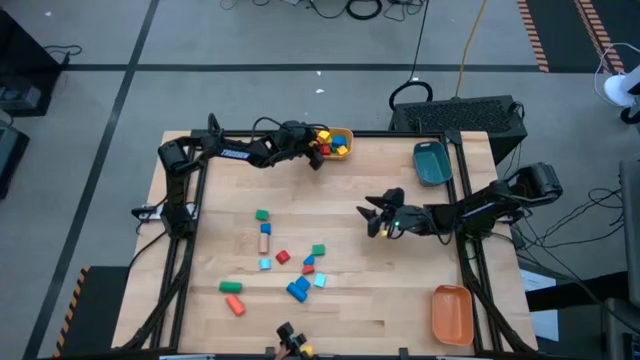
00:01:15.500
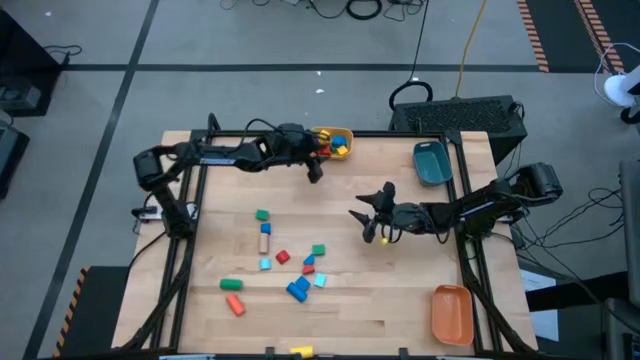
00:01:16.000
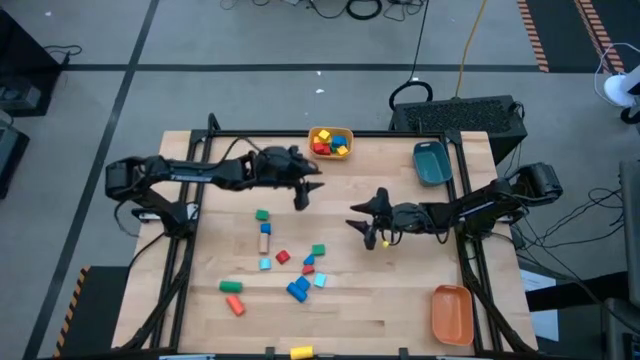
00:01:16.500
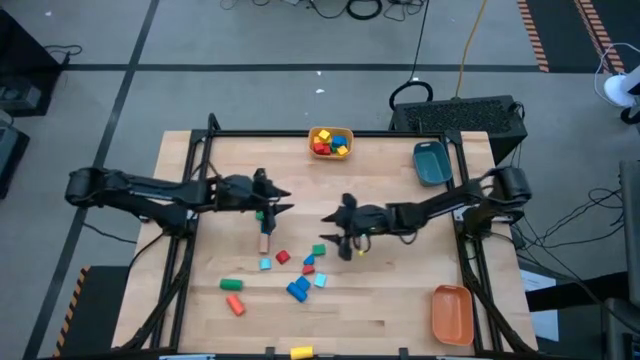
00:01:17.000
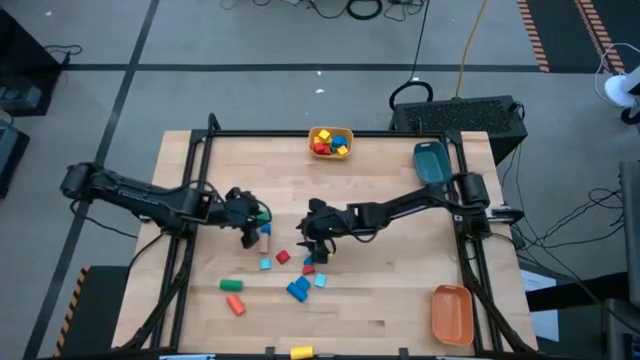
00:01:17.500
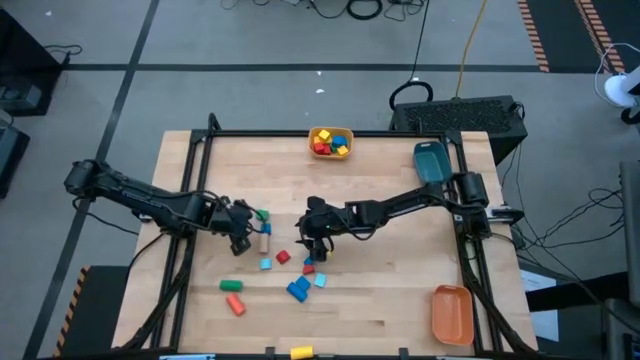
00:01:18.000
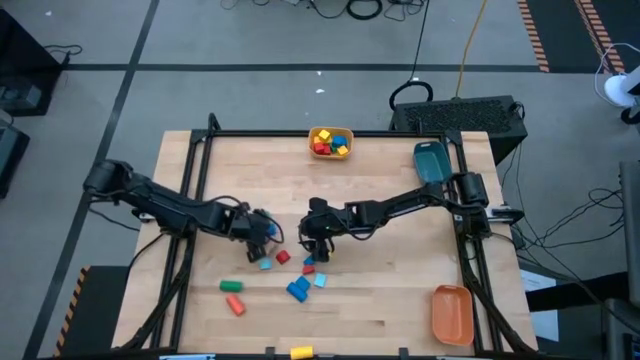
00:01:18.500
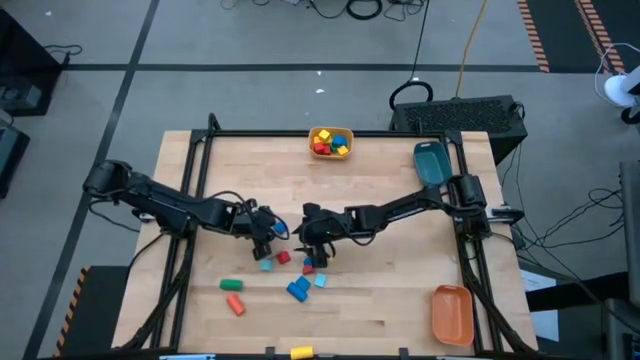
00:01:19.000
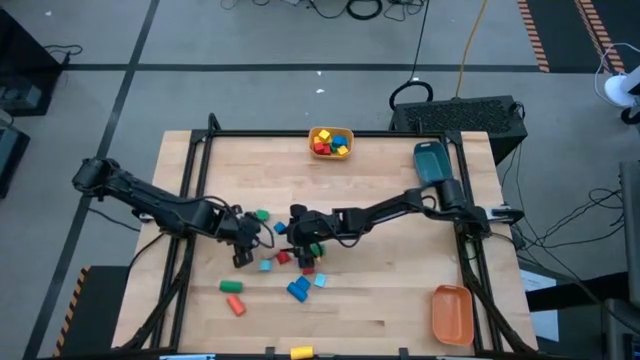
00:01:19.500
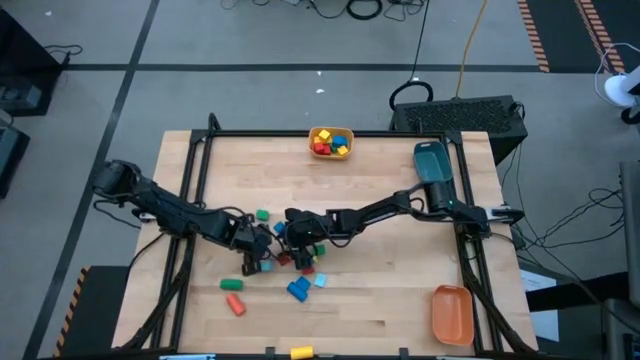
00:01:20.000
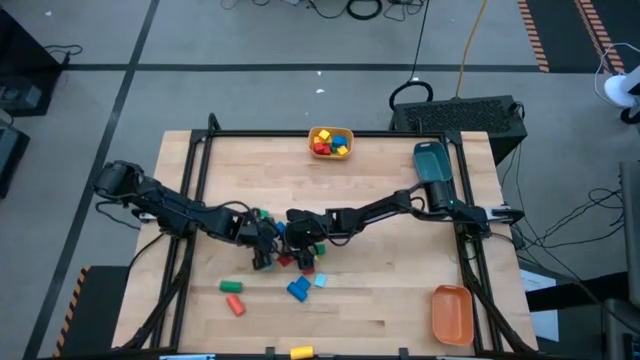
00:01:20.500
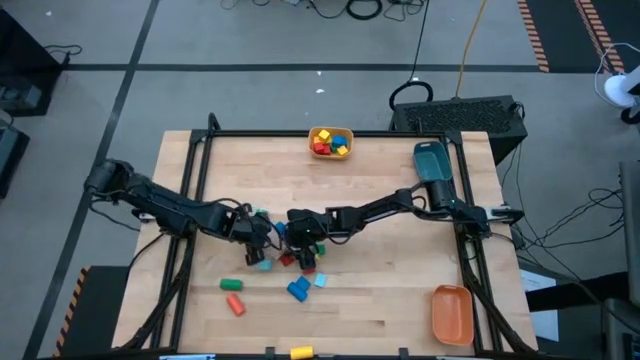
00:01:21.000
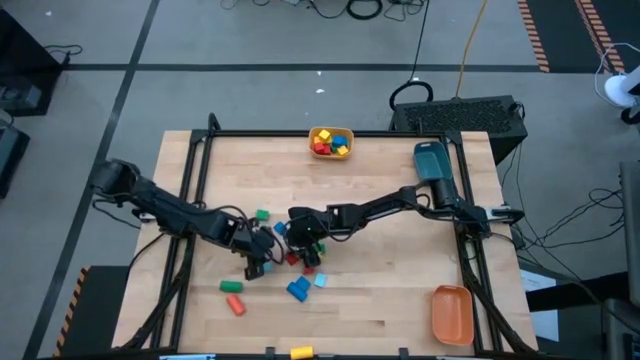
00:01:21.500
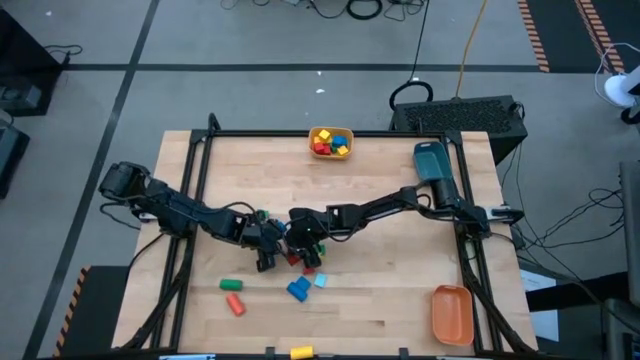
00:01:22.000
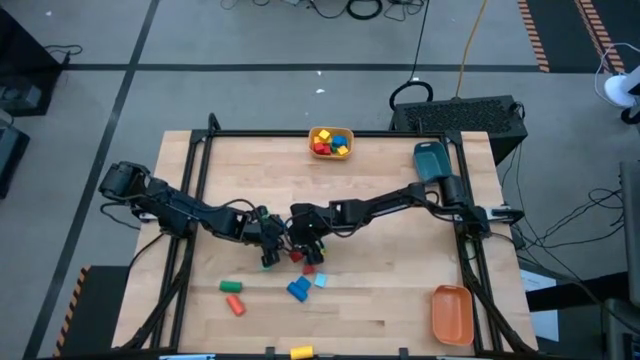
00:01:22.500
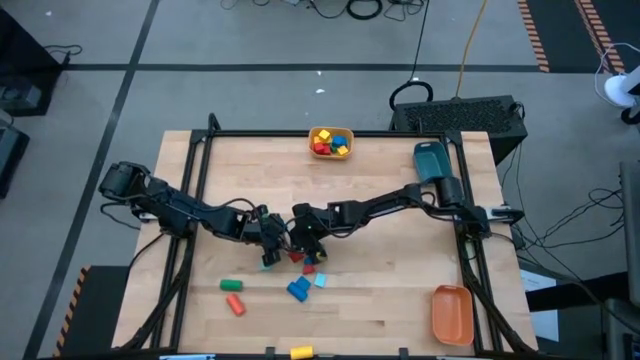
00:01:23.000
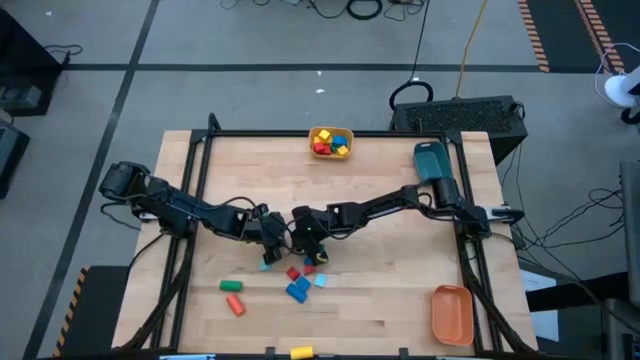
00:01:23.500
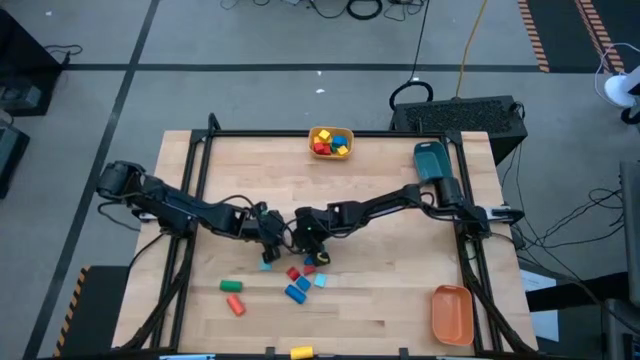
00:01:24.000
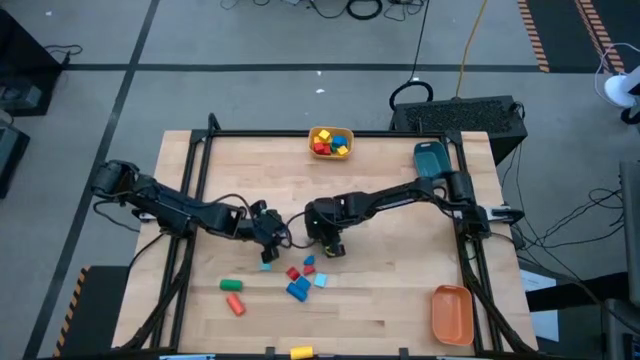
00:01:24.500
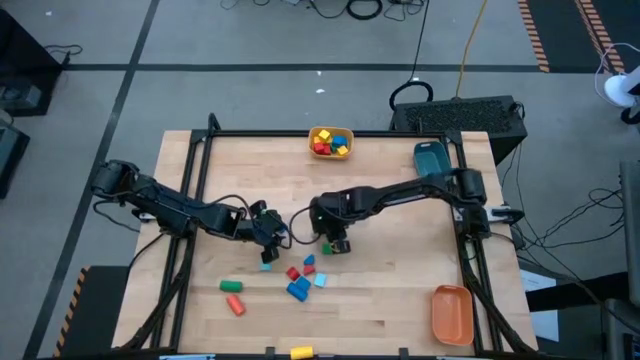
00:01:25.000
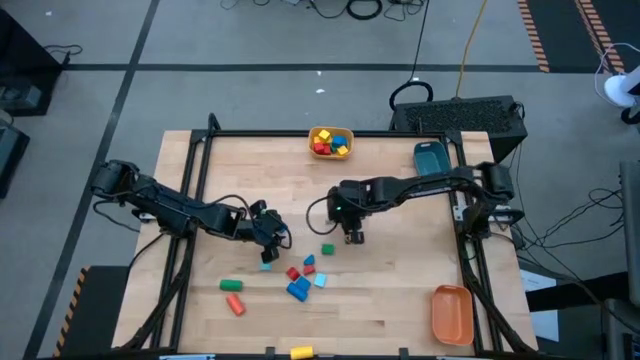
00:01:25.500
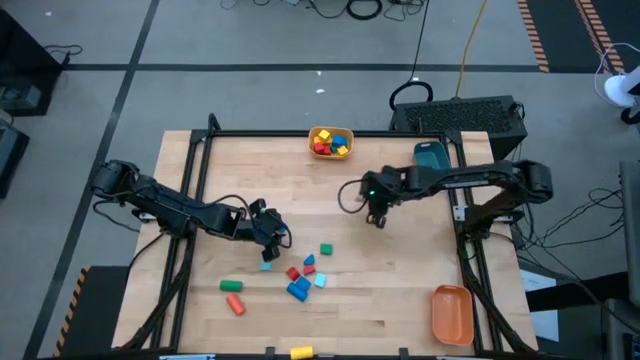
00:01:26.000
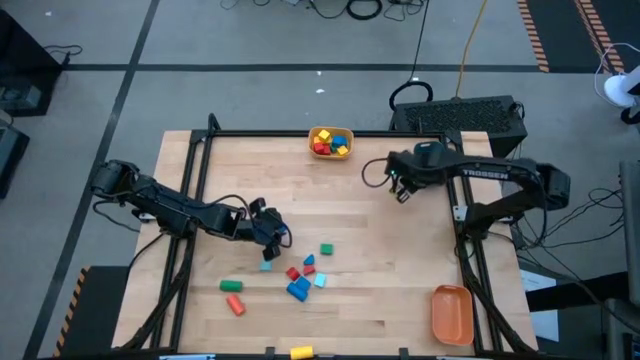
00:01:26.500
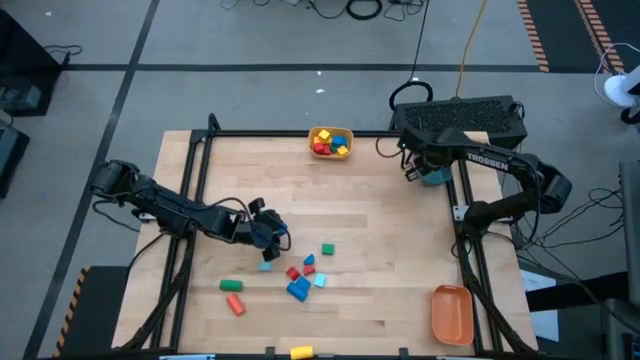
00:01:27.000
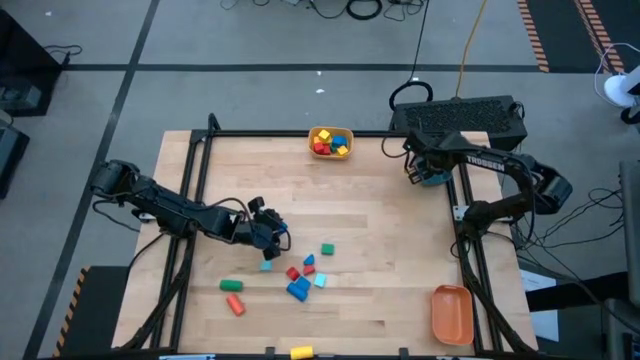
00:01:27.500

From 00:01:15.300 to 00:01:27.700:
Task: Sort blocks by size
Put the brown cylindrical block into the blue bin

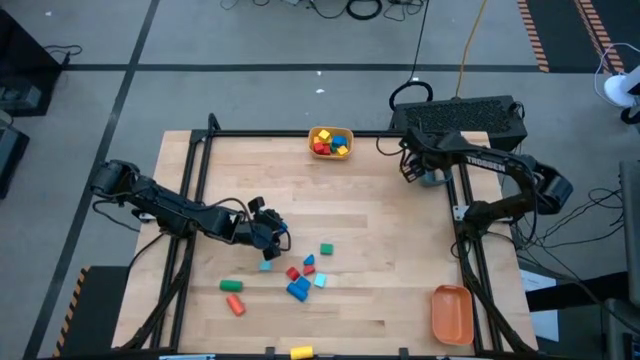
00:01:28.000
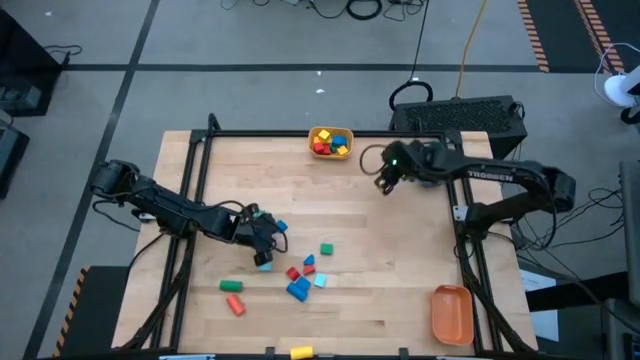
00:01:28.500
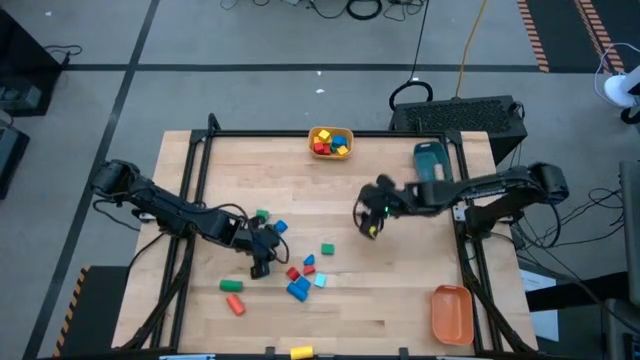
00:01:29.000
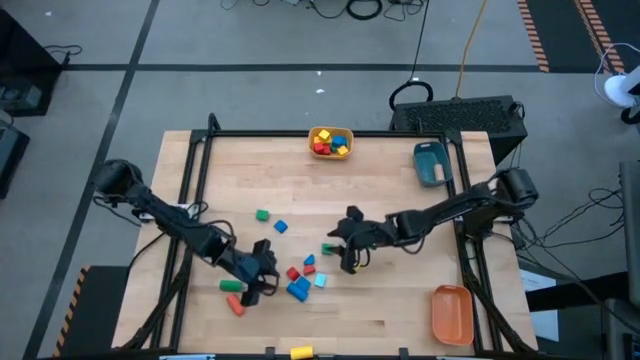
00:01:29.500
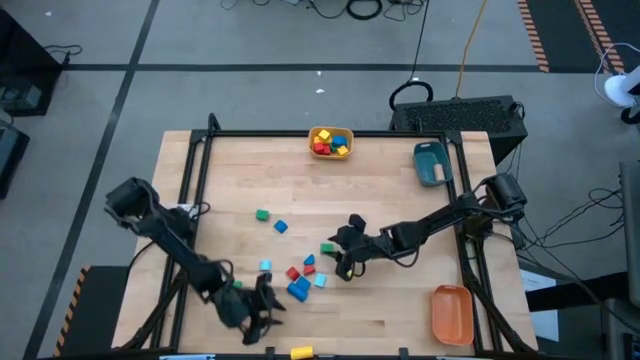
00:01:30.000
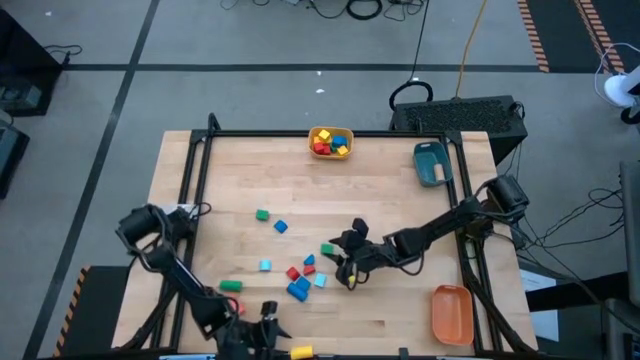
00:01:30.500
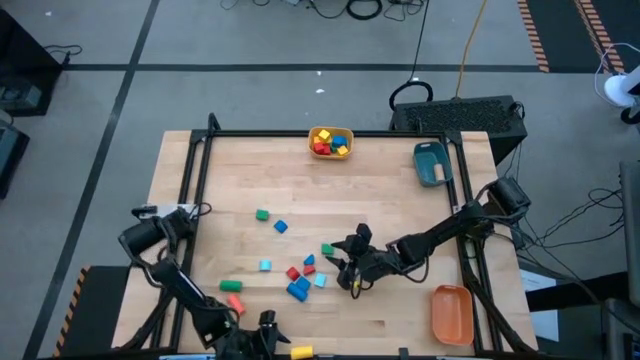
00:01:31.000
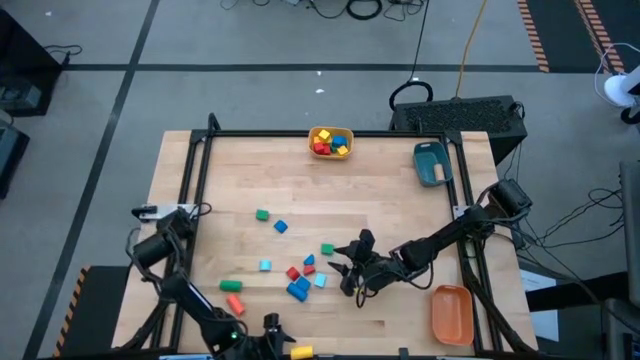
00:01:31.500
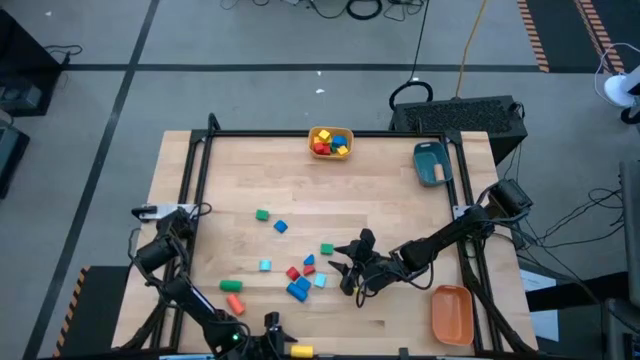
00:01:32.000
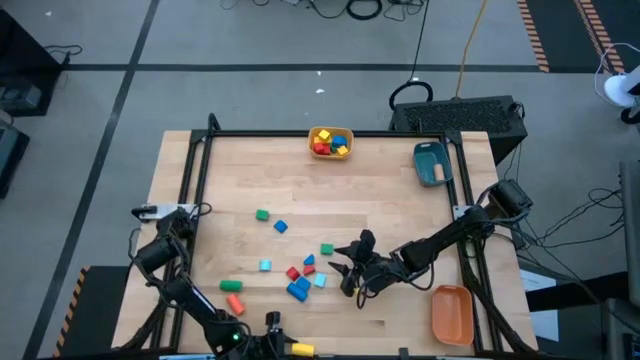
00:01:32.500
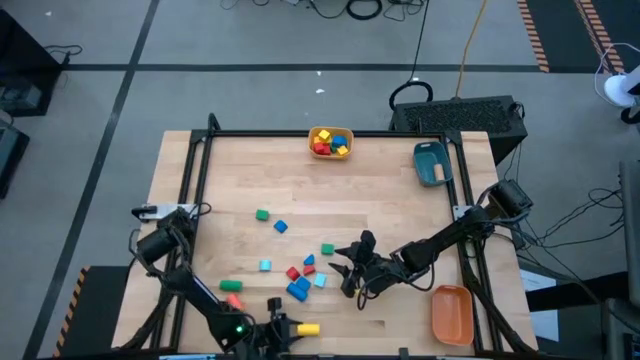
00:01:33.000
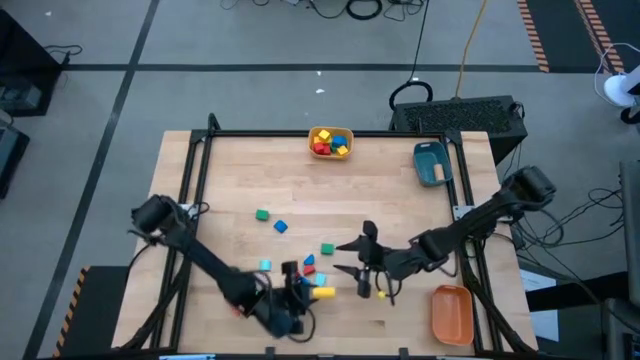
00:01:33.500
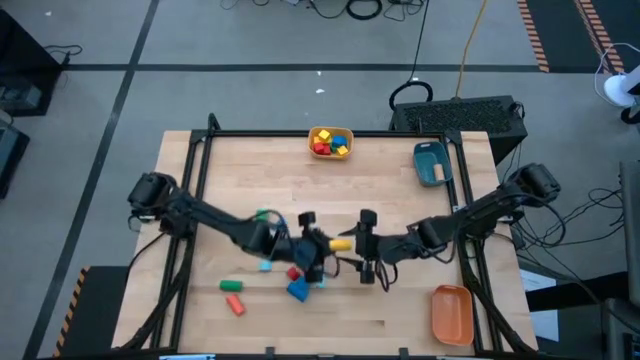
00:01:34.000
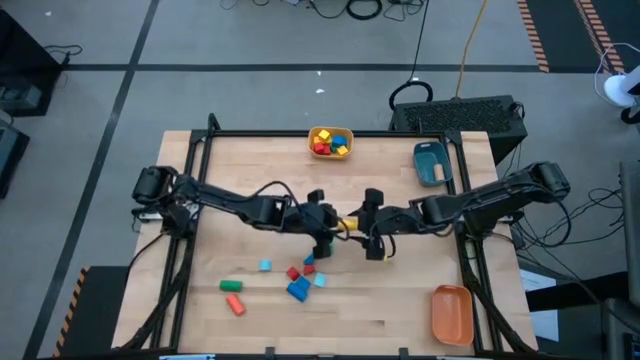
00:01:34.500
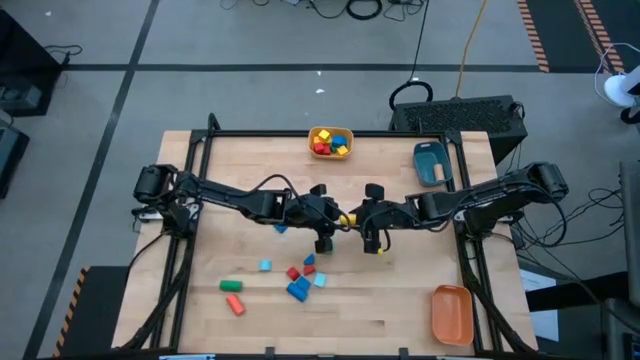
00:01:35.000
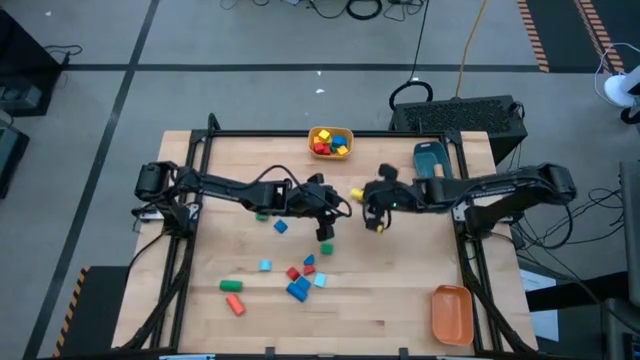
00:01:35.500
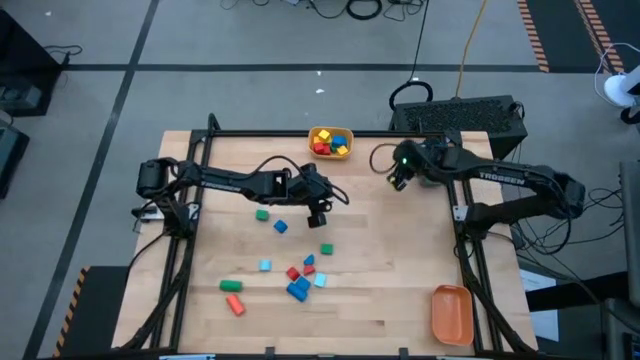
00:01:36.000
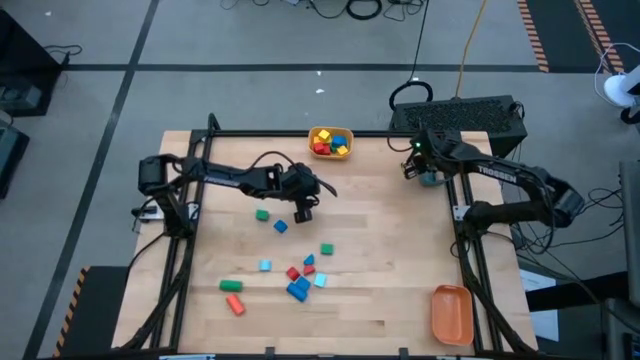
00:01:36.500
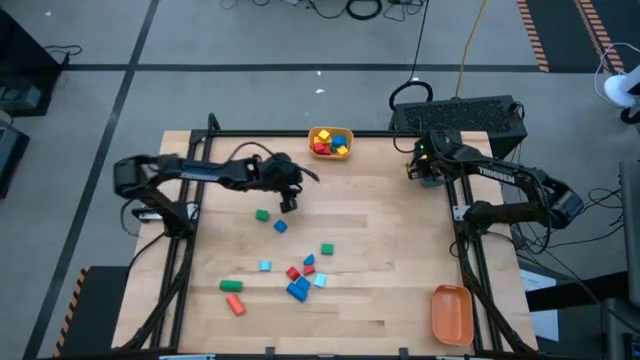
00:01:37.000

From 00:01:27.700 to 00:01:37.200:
Put the yellow cylindrical block into the blue bin
